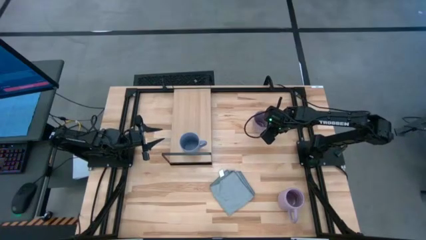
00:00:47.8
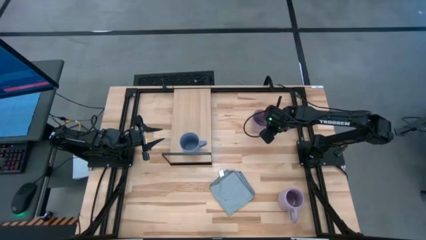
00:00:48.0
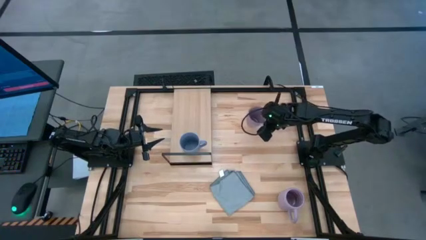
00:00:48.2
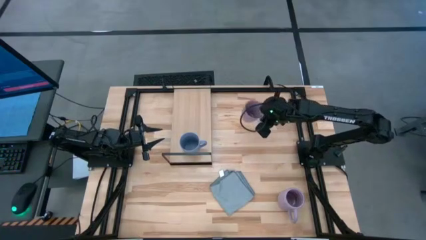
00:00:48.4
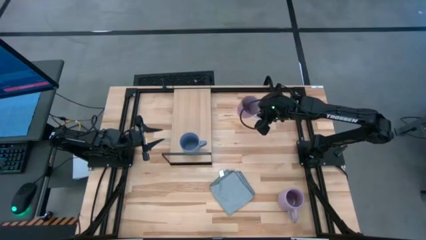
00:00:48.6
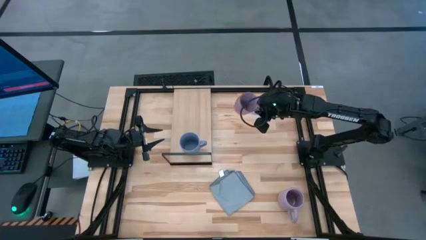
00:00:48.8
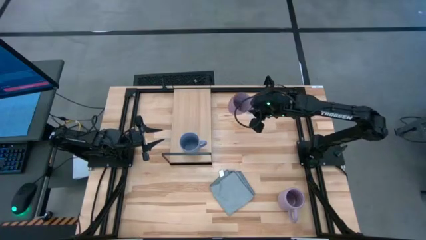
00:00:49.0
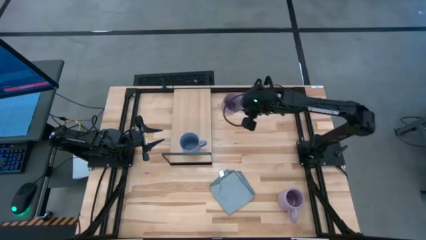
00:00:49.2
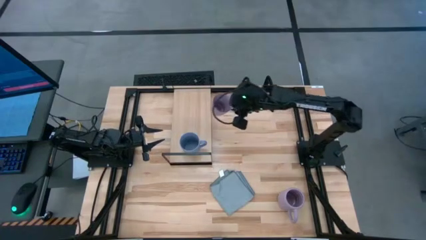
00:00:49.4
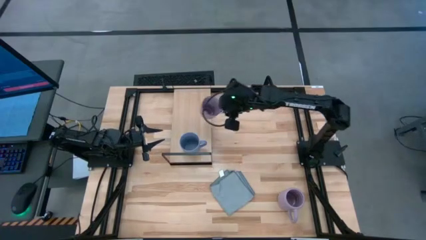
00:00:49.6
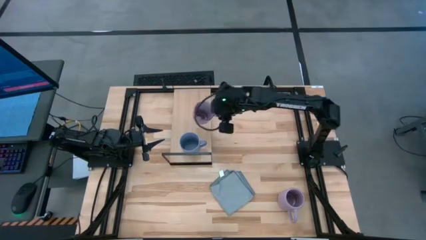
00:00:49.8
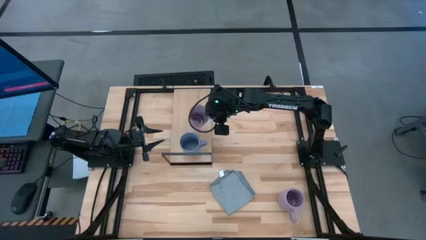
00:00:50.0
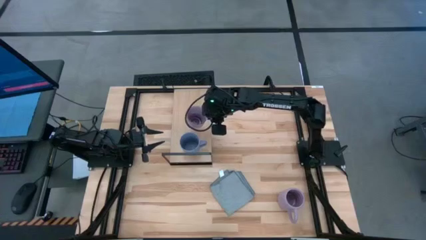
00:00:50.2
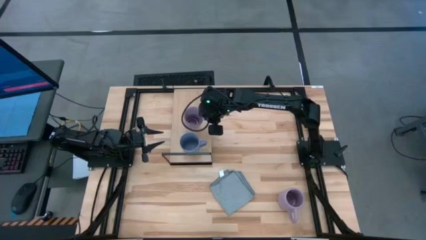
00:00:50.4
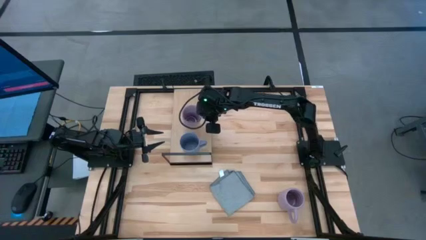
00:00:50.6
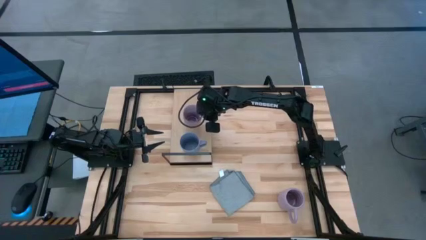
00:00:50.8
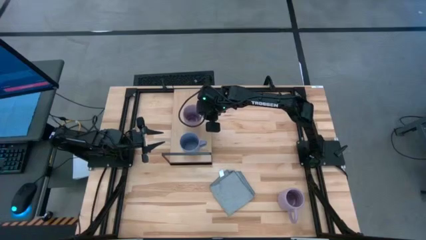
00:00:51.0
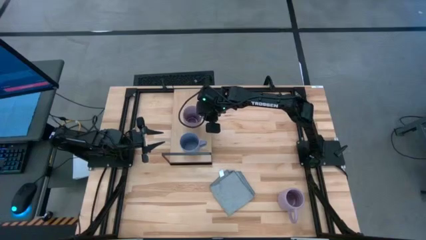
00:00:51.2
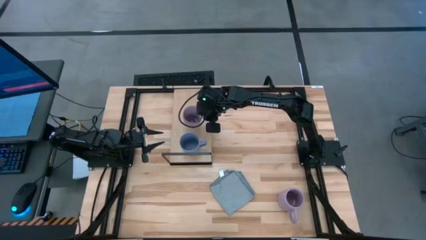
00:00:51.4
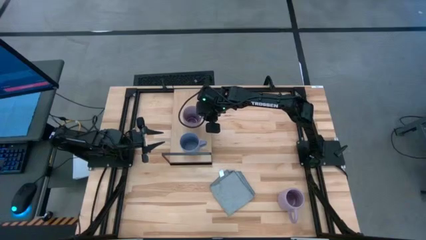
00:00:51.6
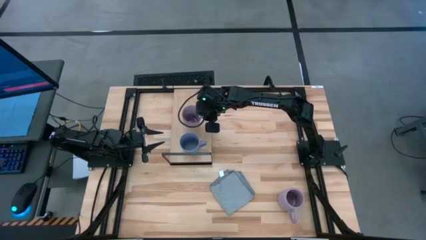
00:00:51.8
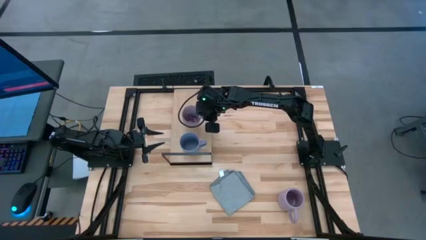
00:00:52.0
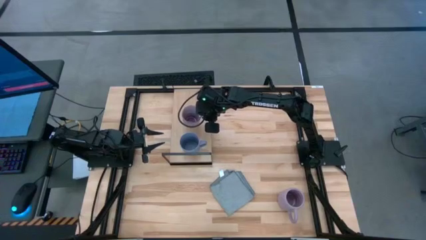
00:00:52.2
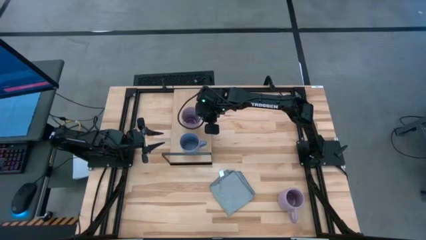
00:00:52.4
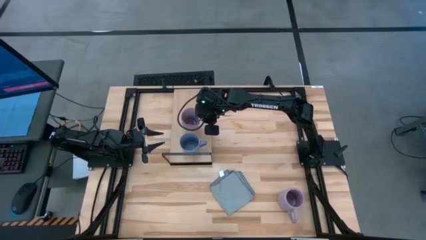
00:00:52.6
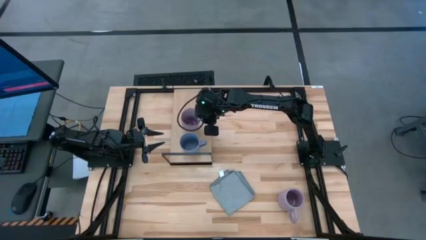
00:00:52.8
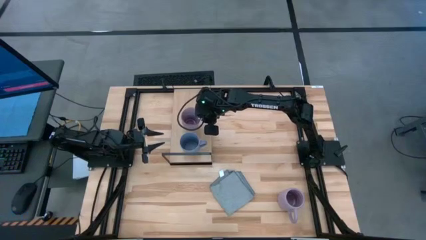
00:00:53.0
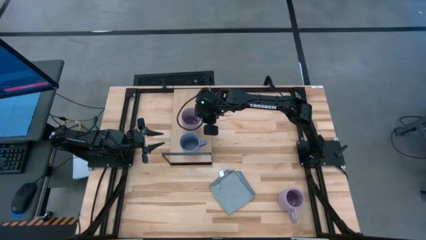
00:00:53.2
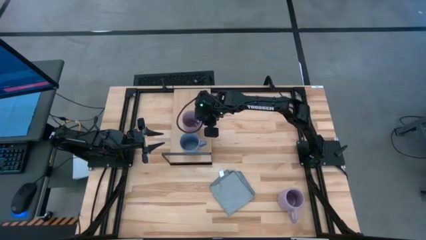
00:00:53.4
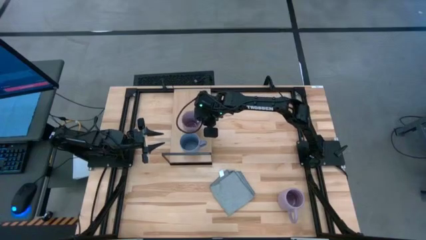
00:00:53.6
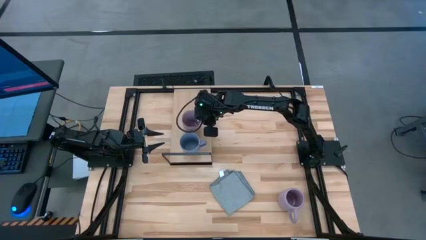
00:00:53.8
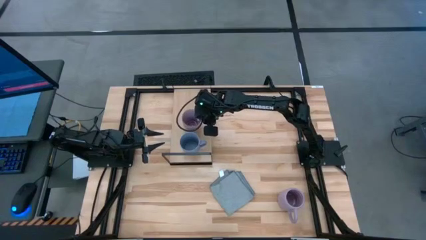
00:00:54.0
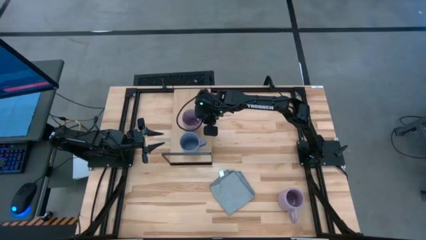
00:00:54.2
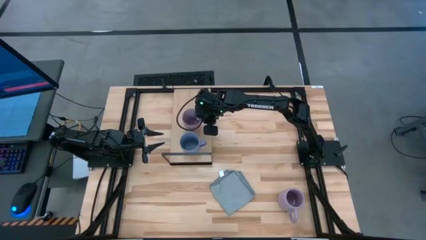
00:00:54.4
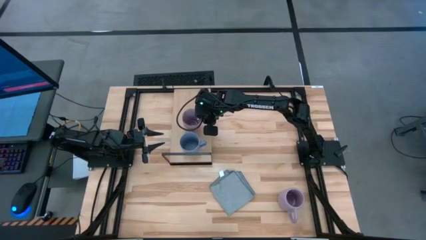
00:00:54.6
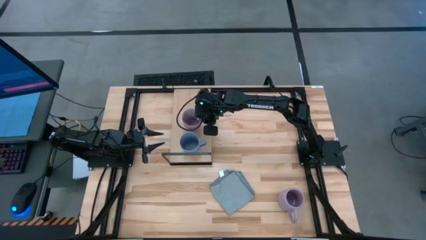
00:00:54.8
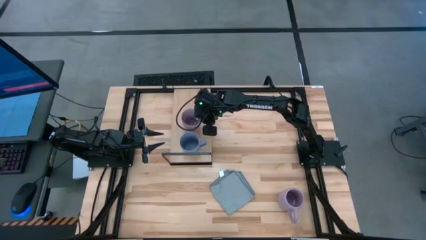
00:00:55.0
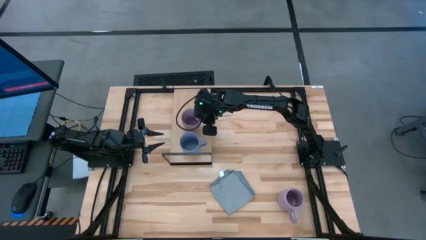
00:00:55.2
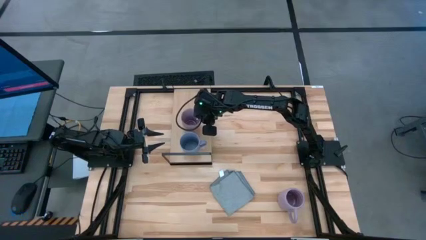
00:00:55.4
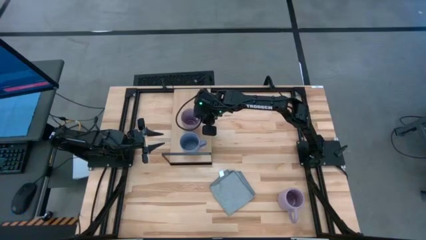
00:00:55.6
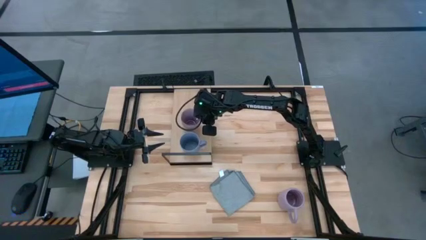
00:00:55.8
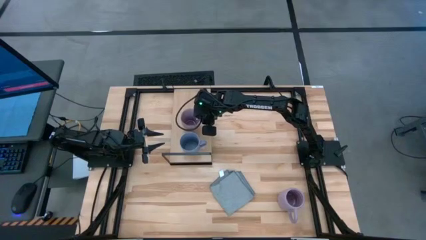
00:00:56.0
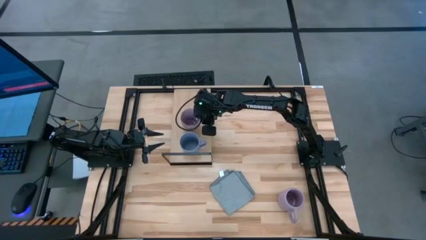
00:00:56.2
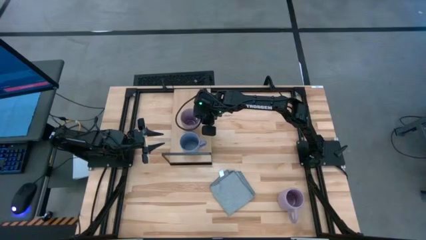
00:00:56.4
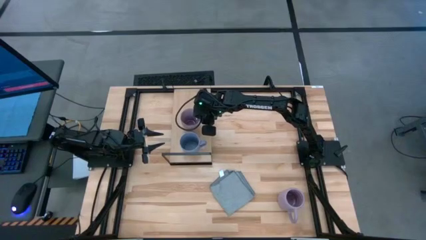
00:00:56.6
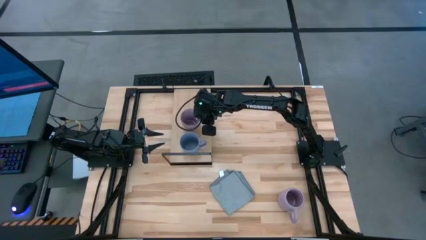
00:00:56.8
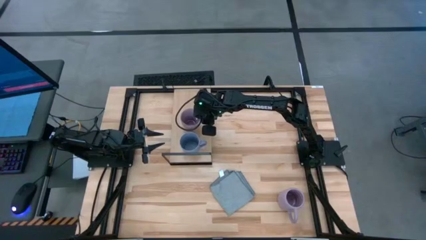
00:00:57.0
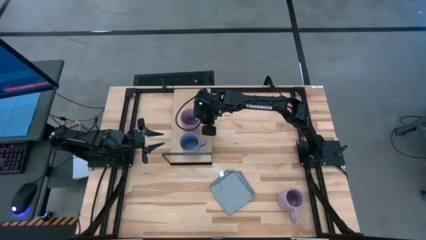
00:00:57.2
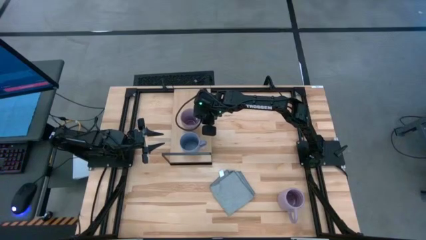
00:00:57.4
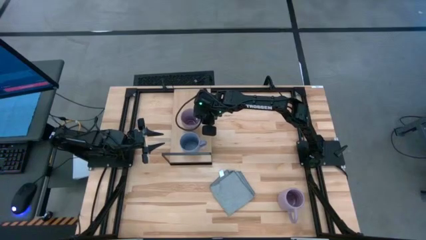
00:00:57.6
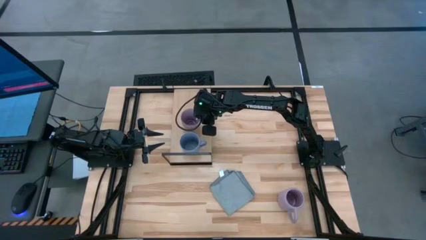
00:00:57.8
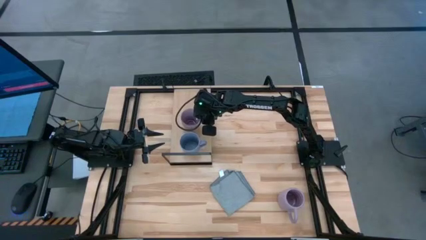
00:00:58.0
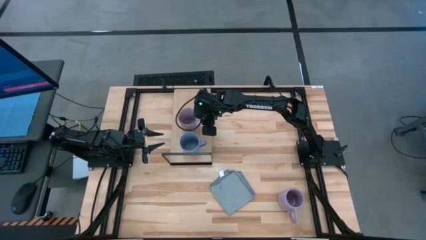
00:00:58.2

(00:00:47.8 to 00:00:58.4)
Task: Stack small to large cups/mugs on shelf
Put the top light purple cup on the shelf
